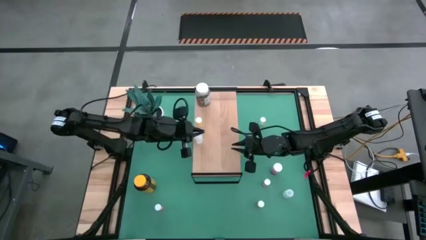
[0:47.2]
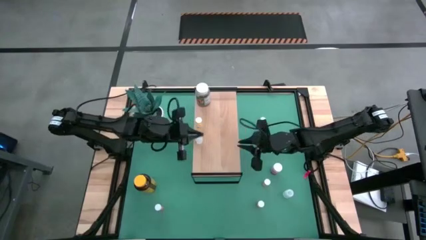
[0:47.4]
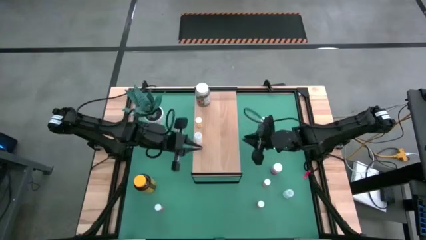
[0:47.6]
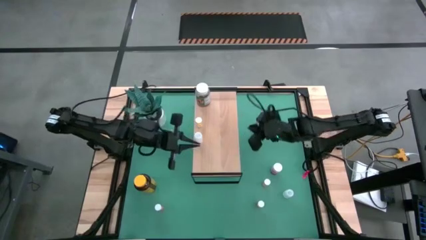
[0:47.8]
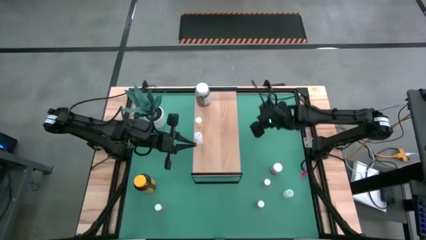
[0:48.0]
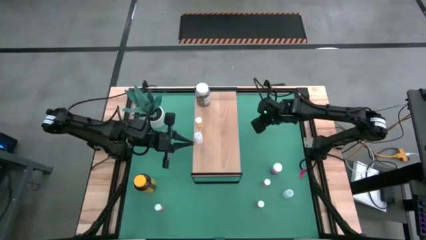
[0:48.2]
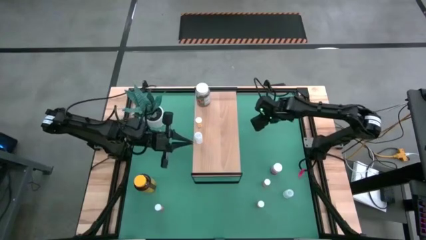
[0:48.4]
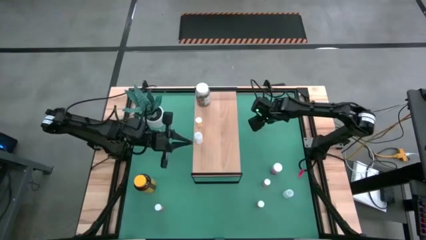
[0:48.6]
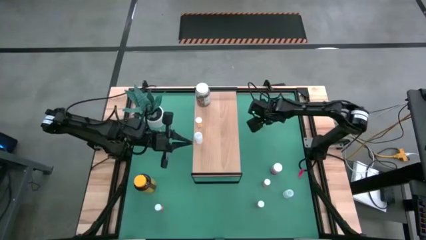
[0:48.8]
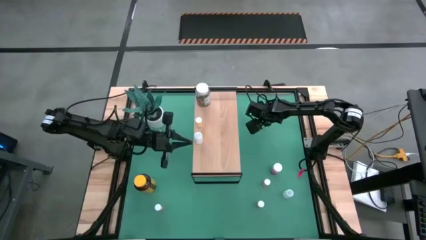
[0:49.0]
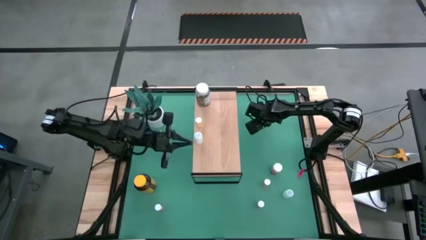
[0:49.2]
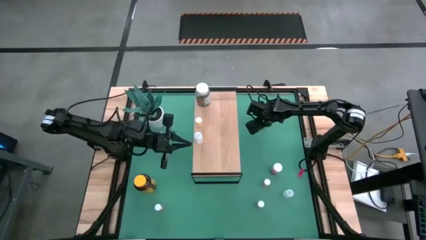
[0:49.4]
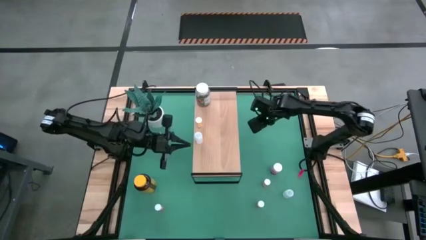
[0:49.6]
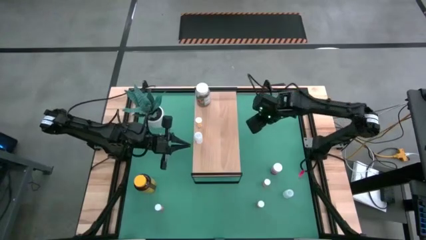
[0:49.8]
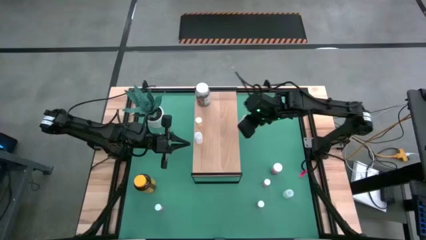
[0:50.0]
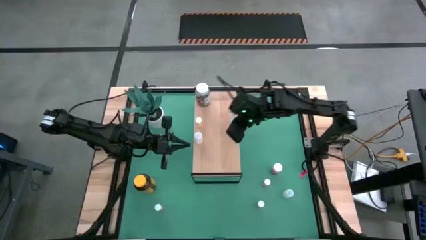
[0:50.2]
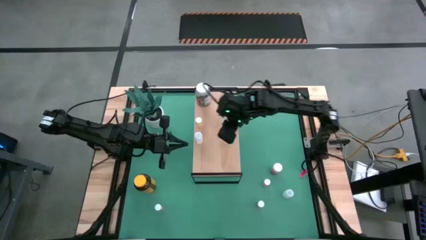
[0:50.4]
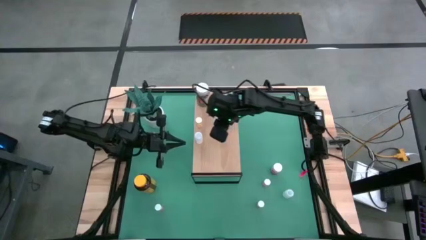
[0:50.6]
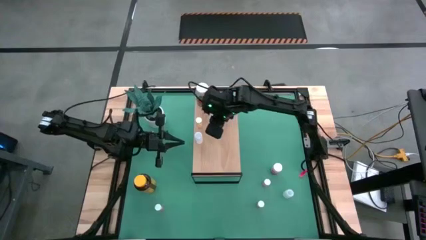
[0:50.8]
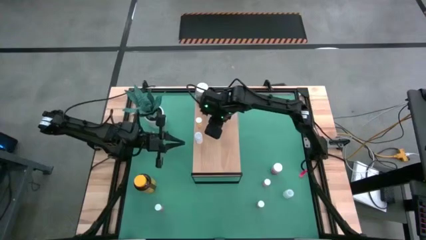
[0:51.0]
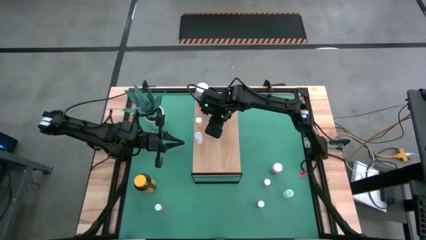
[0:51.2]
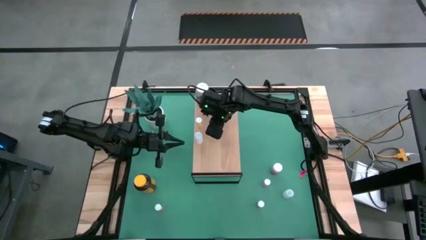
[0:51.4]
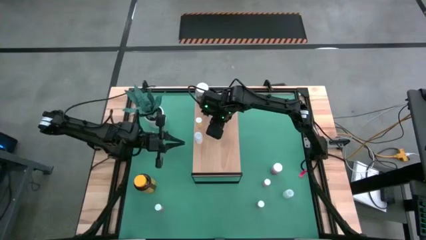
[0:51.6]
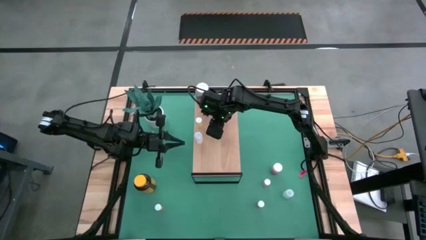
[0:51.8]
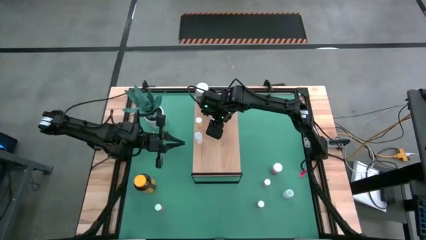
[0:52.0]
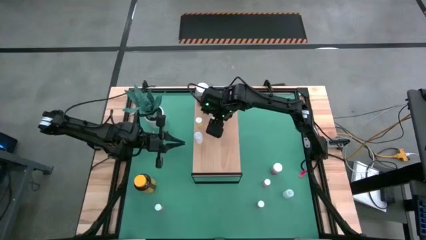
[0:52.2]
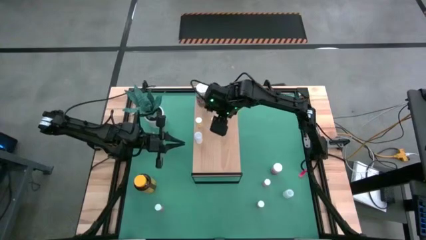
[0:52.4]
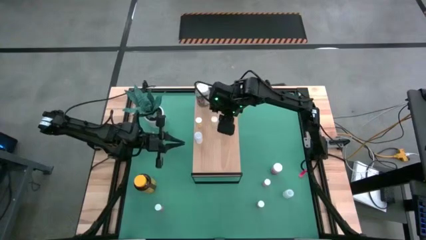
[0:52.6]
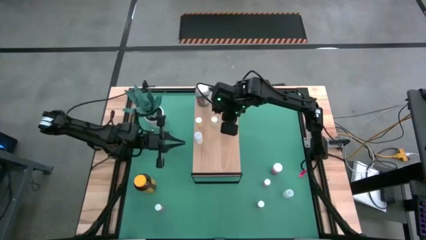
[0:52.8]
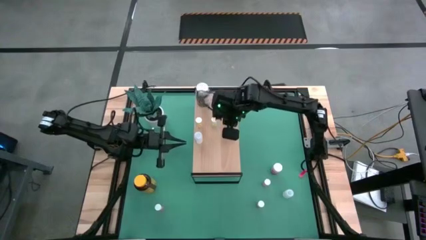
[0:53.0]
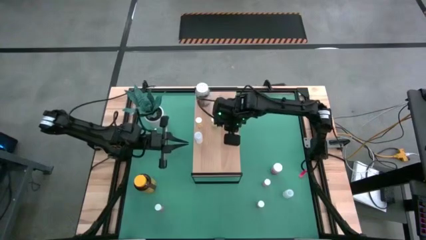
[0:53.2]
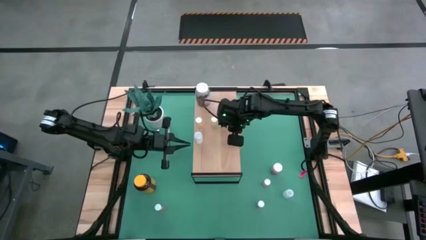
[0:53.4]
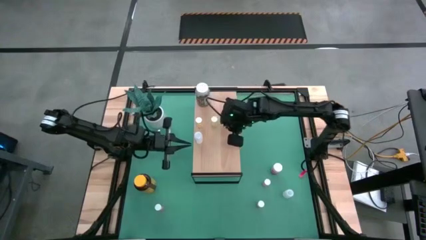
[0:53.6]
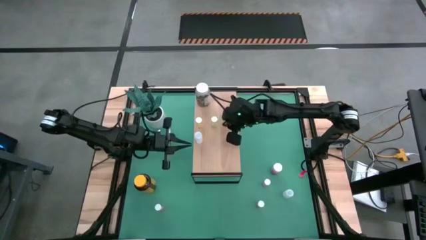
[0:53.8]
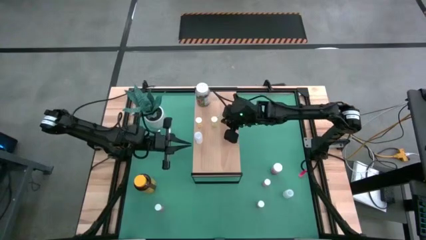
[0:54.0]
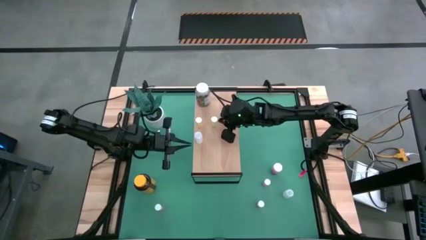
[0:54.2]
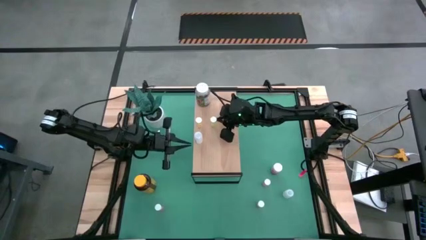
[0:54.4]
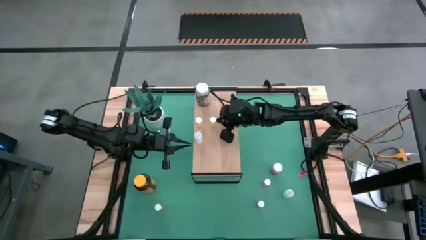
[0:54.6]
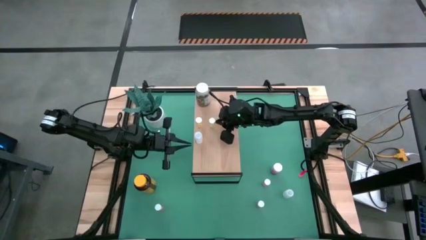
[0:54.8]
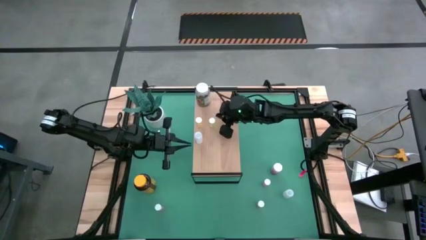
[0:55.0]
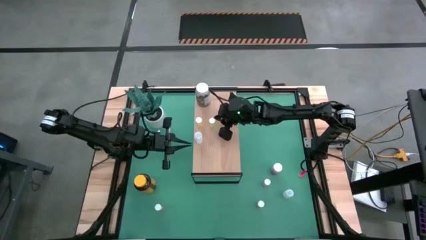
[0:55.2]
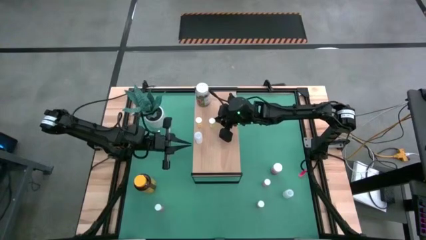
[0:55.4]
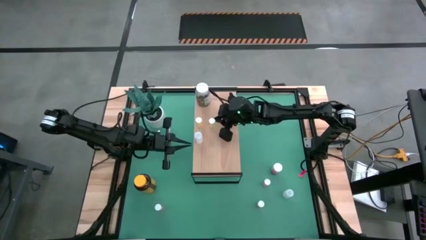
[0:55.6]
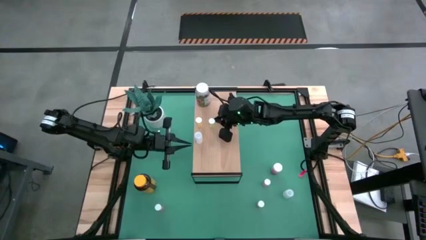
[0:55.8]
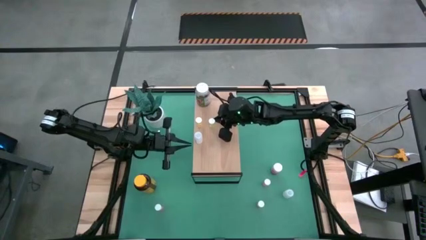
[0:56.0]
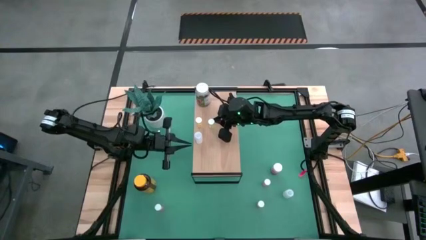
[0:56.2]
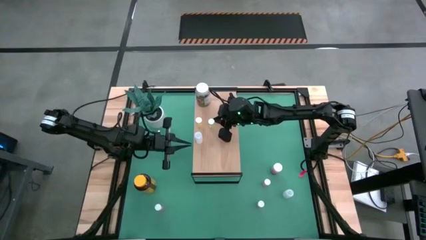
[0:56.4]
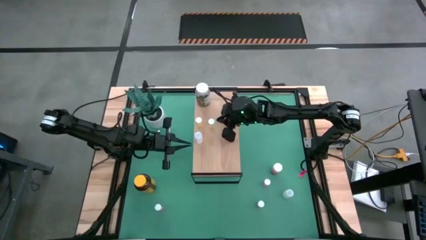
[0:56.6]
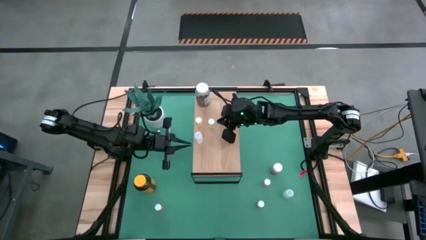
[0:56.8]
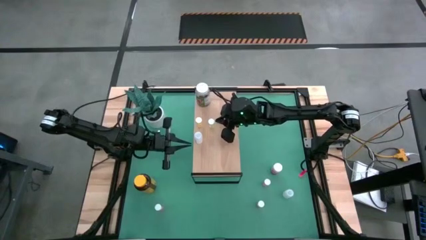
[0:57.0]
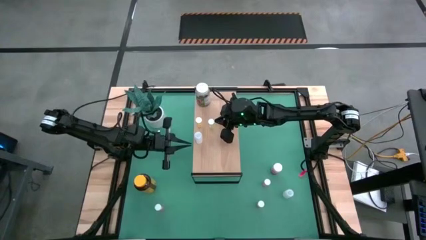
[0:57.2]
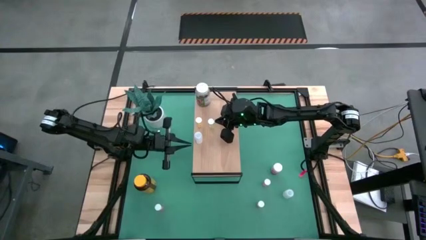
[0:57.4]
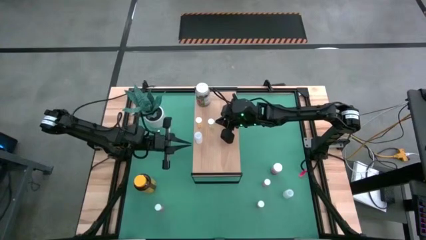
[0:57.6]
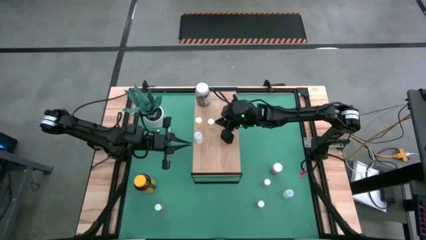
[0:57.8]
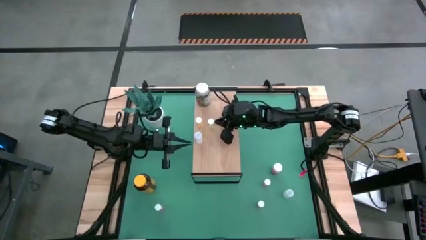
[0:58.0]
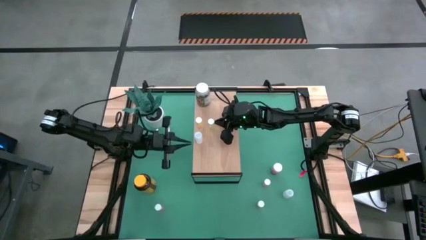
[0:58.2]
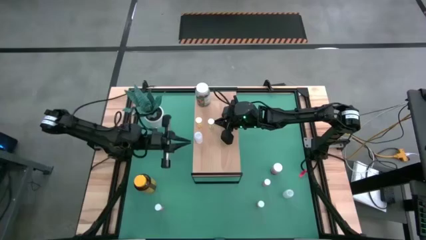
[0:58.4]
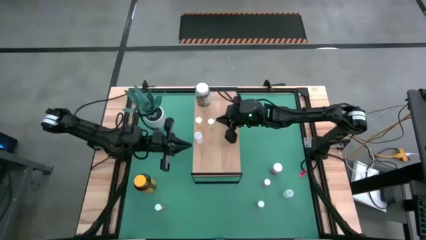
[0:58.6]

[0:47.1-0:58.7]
Task: Pick and place medicine bottles onto shelf by color
Put the light yellow pill bottle on the shelf

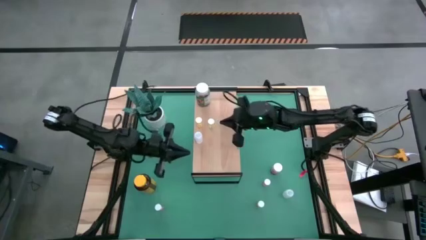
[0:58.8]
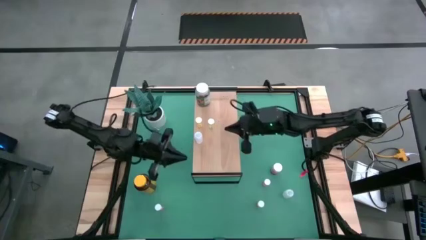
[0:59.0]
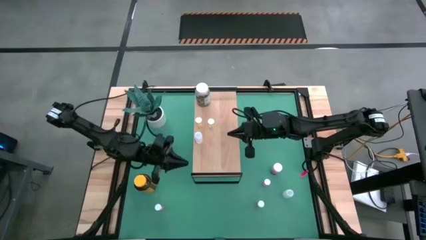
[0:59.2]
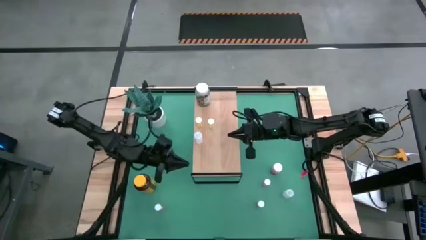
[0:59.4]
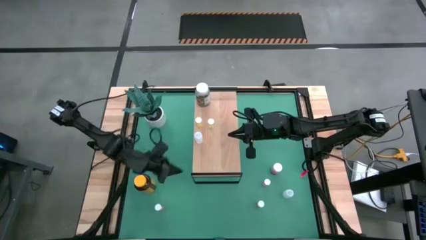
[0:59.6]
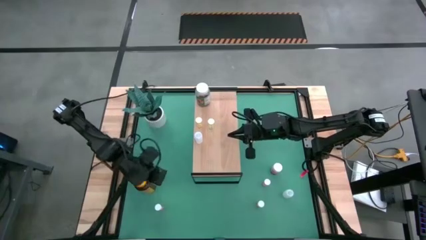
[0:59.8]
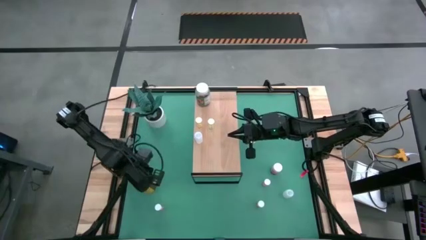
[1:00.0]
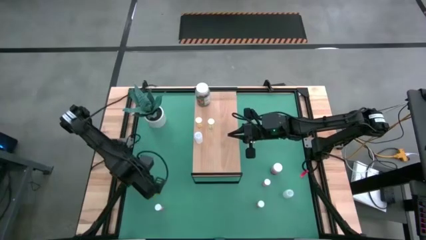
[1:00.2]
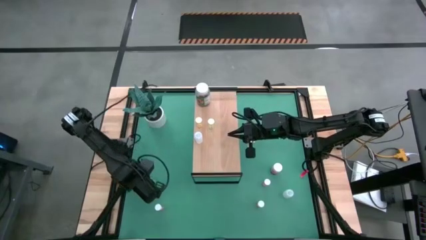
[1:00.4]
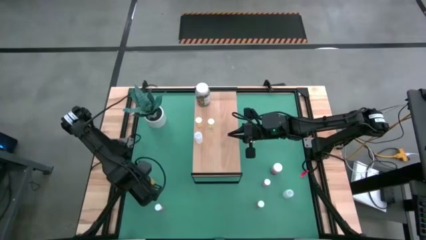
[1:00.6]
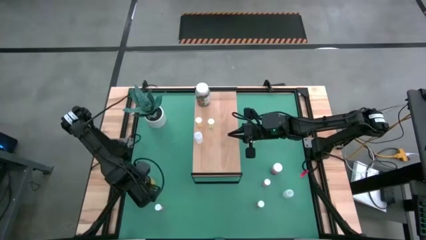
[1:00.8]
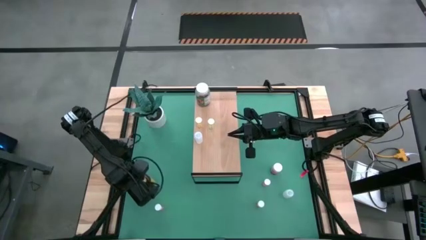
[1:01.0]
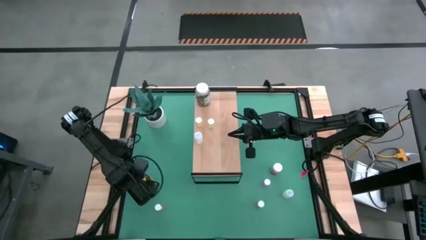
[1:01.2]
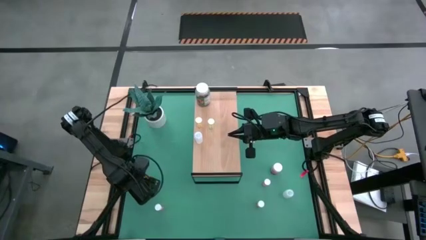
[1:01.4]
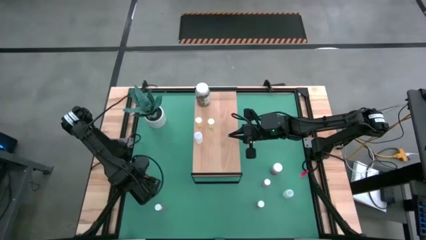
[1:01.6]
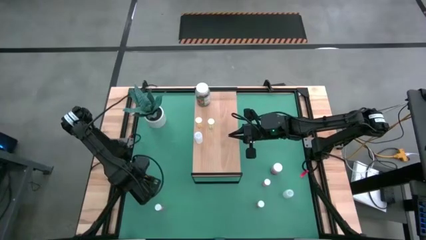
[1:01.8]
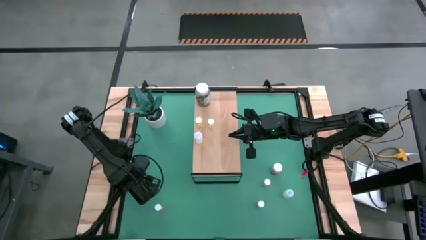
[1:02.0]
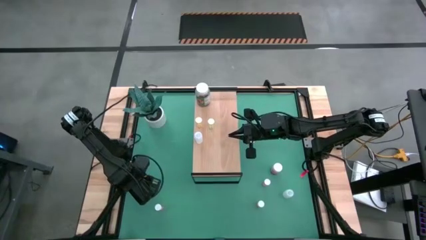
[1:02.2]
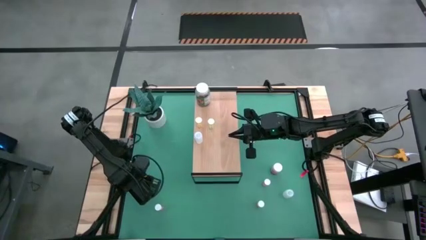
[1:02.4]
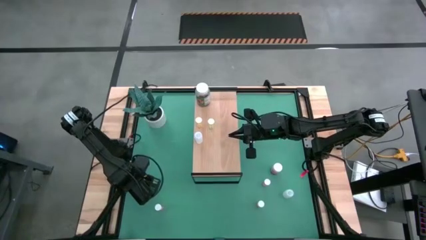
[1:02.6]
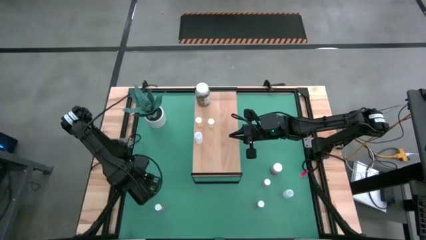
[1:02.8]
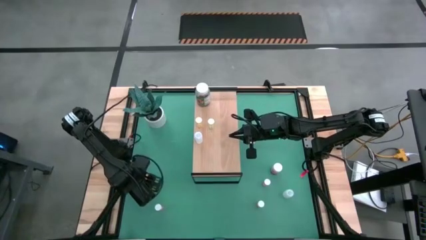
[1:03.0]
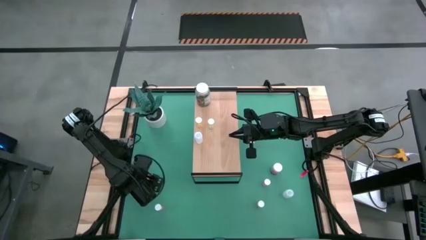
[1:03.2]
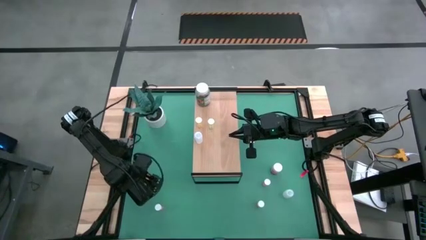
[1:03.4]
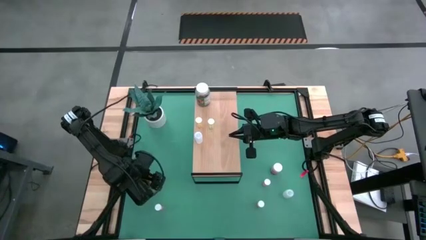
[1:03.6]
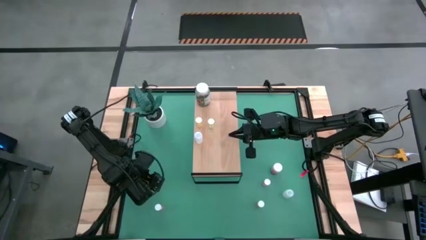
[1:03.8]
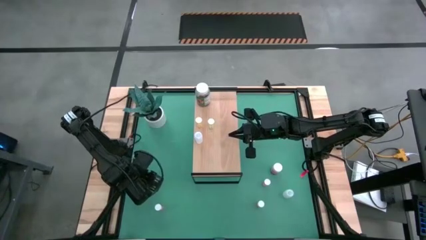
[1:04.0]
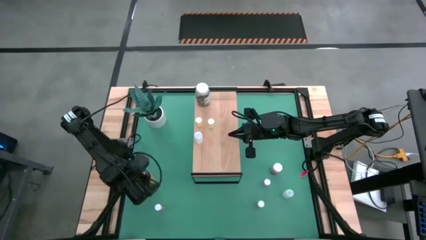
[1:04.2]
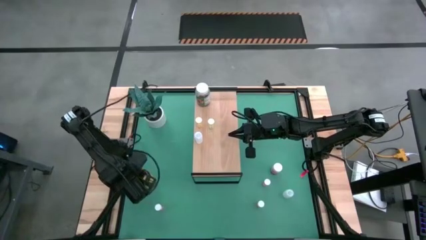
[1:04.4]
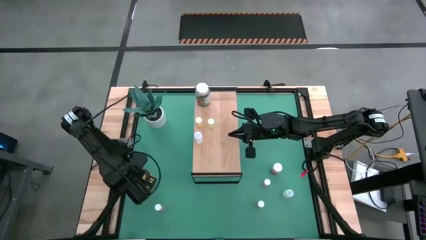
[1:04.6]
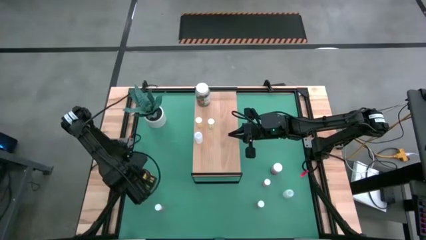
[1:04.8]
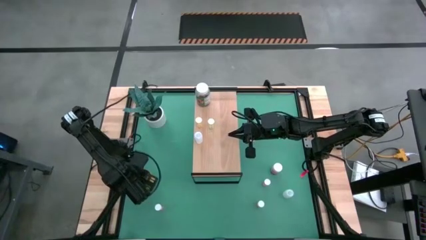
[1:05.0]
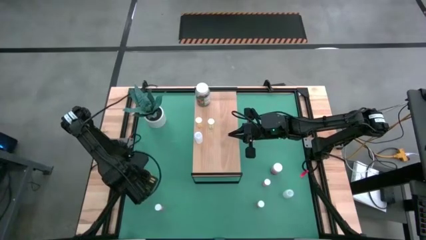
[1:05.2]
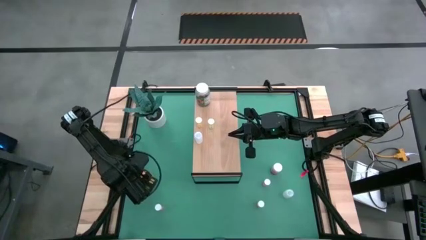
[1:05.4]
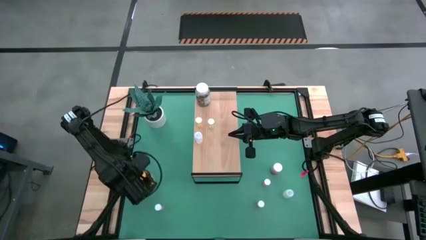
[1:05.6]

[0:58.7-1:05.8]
Put the yellow pill bottle on the shelf
